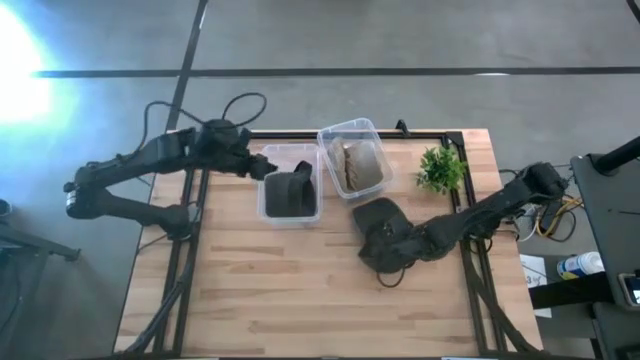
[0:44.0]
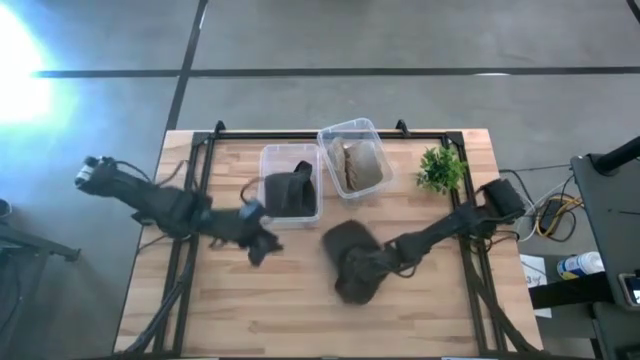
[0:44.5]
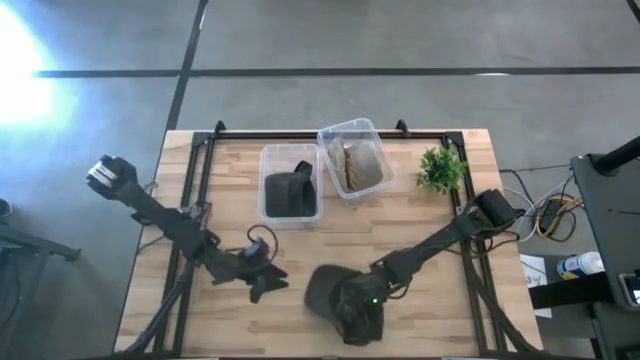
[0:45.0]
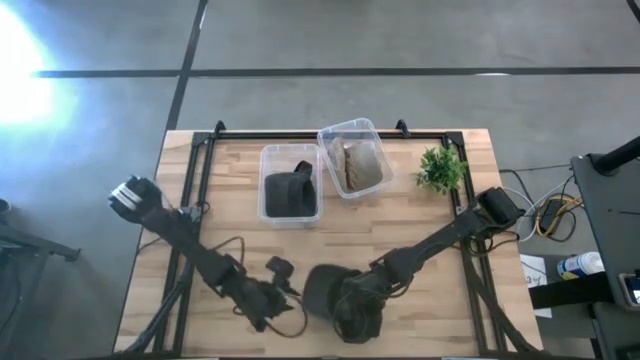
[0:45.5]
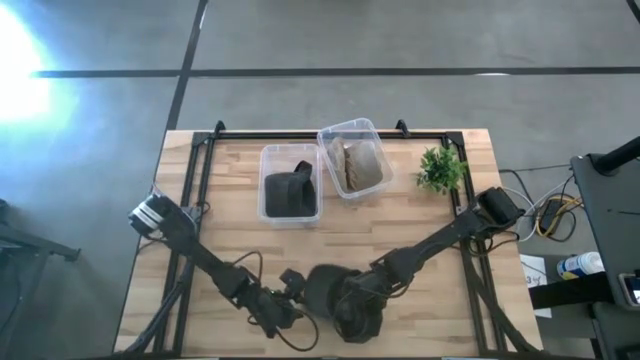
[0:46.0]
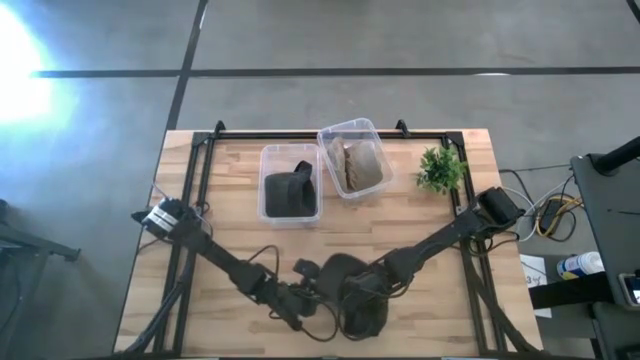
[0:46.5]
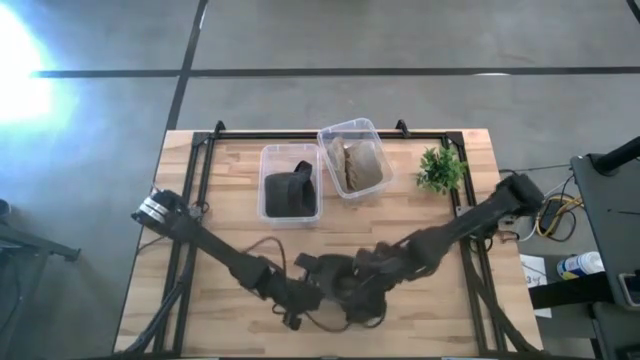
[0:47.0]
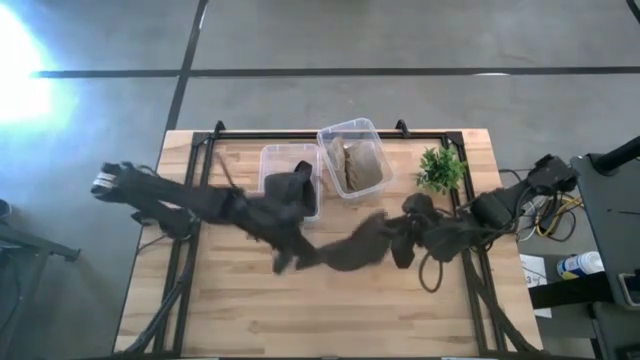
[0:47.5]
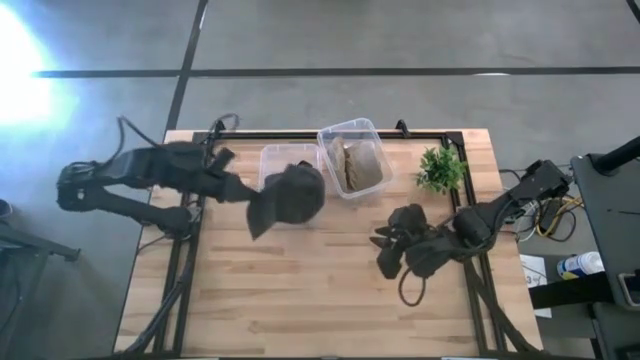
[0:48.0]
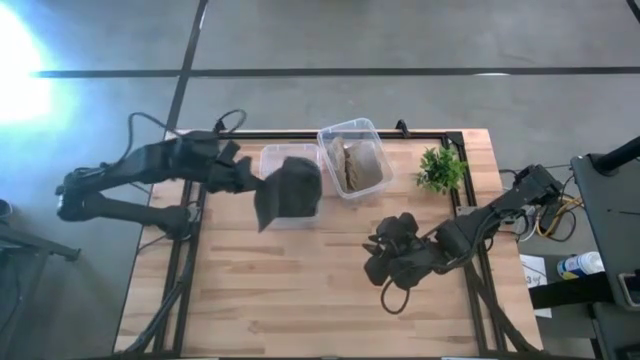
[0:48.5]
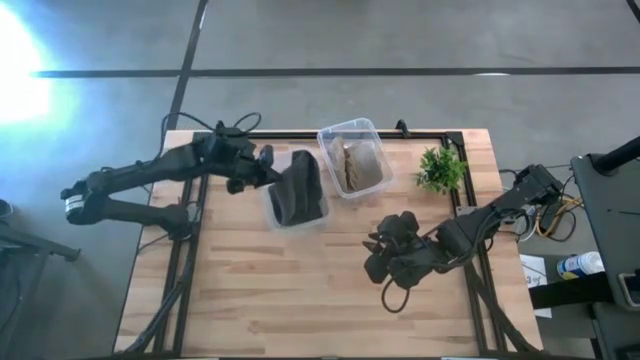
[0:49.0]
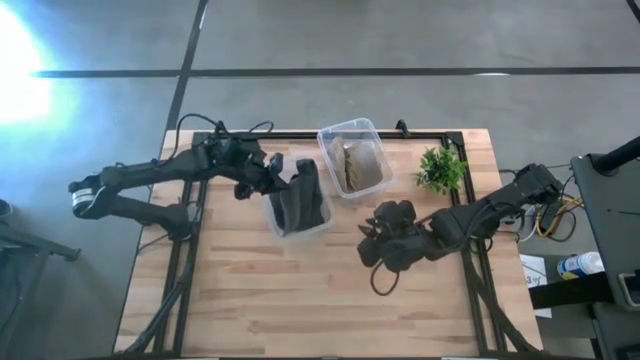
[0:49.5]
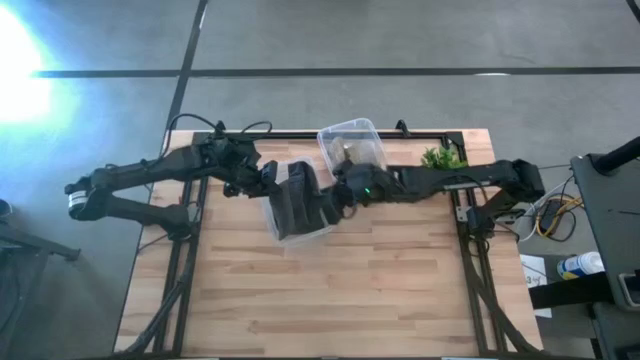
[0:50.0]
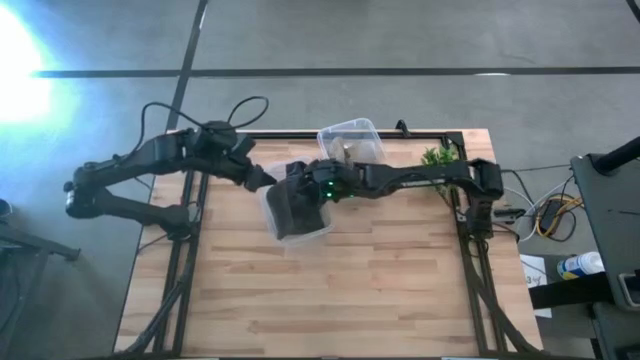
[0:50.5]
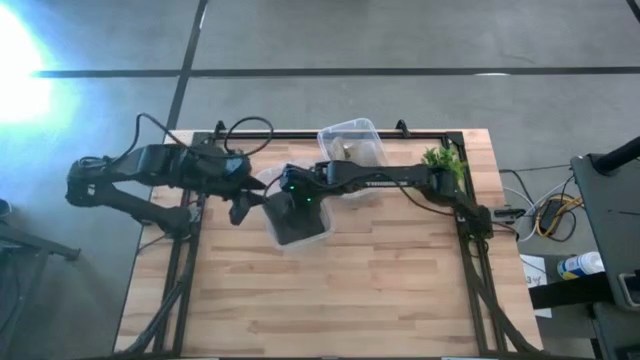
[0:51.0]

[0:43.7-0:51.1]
Task: Pick & Place hat
Put the black cap into the left transparent bin

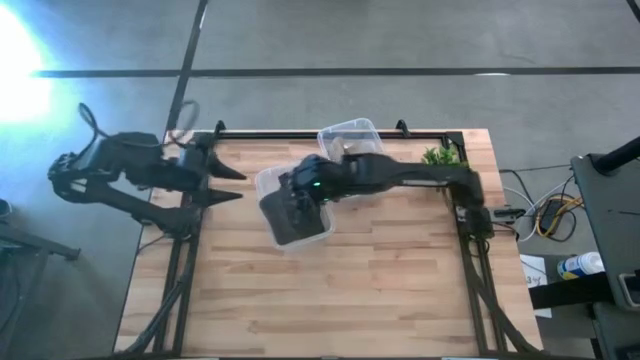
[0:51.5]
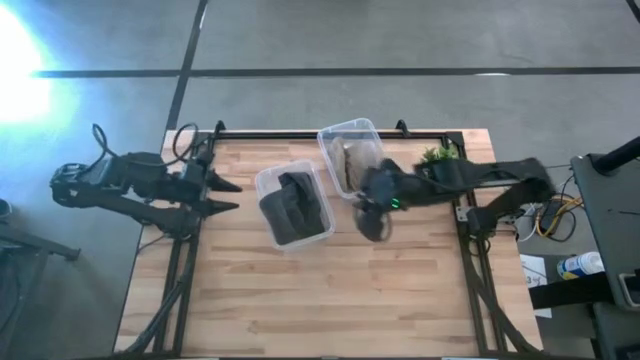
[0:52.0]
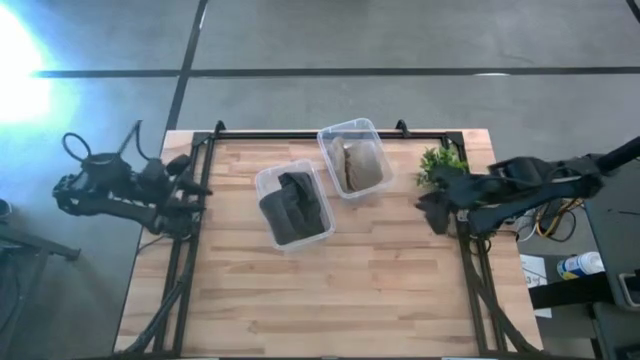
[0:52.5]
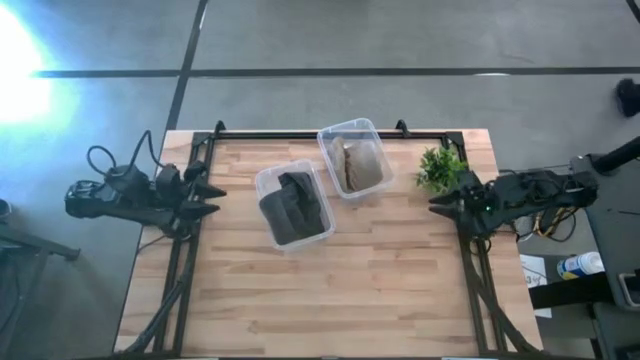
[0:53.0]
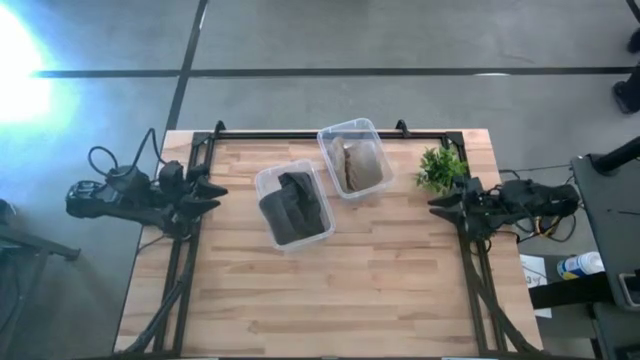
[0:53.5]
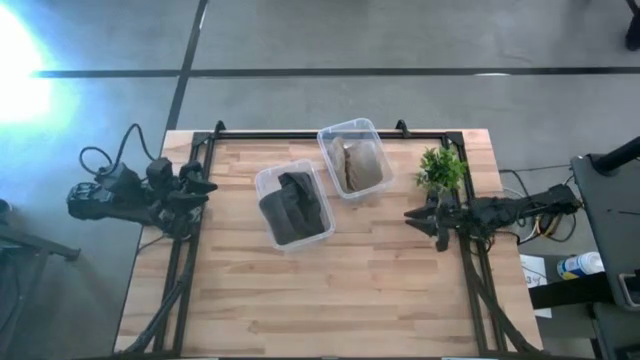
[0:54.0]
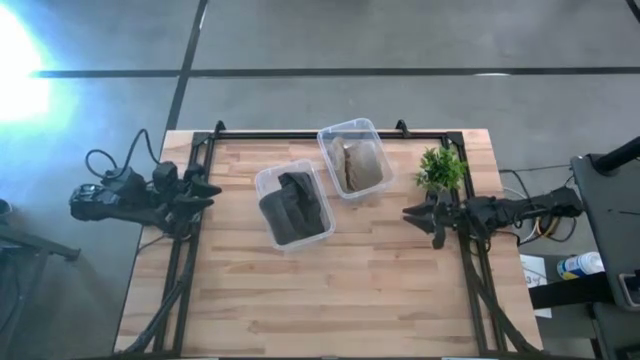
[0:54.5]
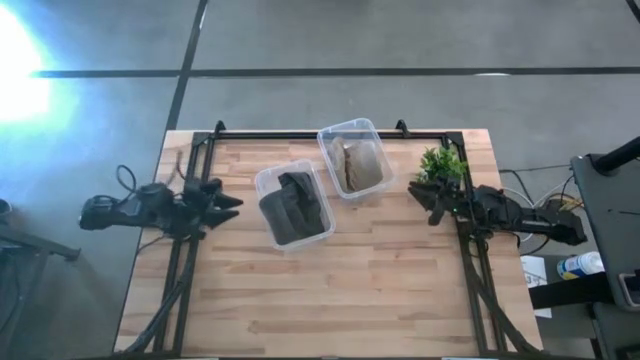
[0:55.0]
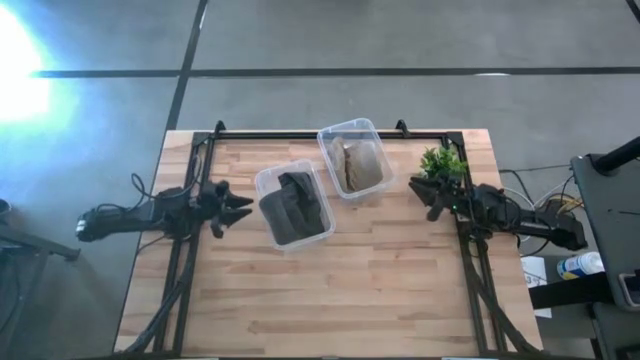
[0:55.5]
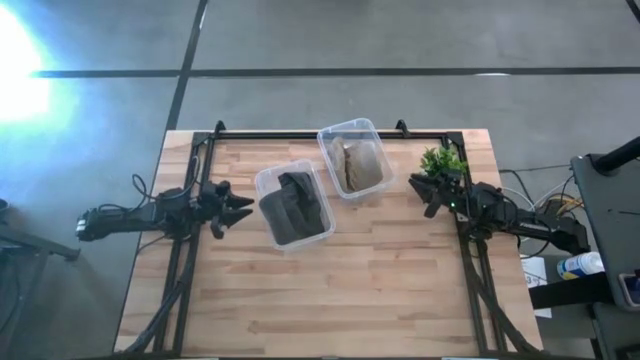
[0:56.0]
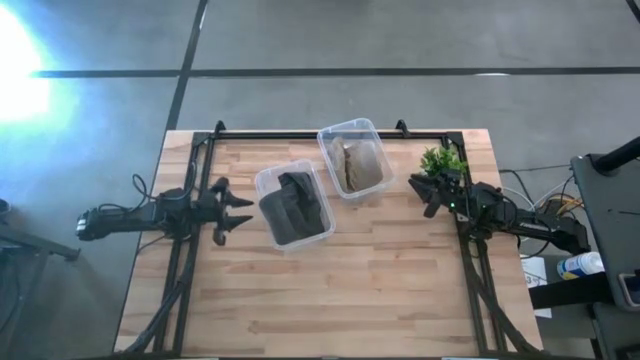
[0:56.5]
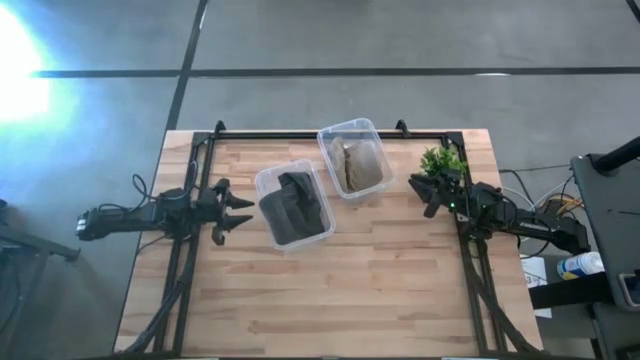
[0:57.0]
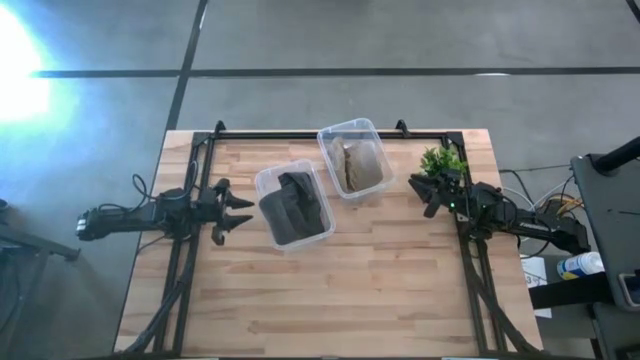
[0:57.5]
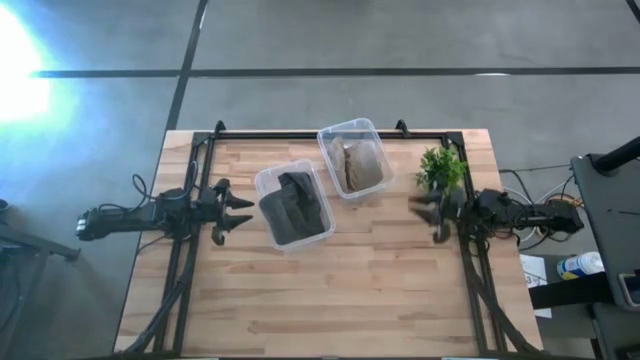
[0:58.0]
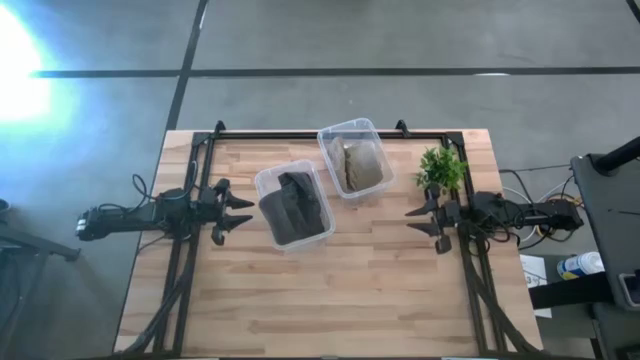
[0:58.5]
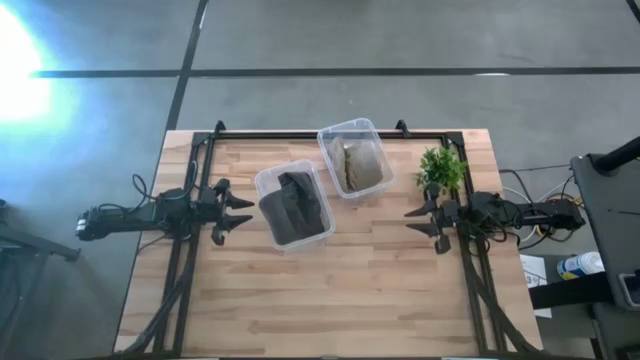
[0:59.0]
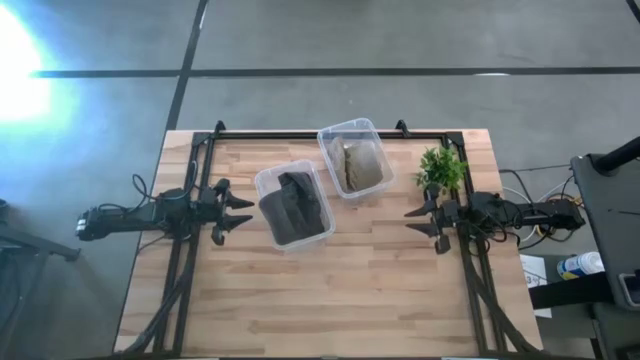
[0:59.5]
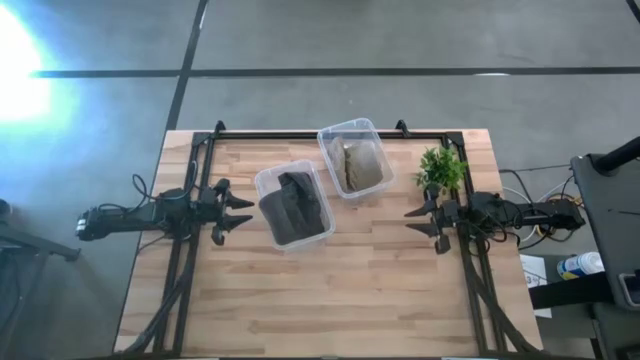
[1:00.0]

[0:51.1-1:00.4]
Return to Home Position

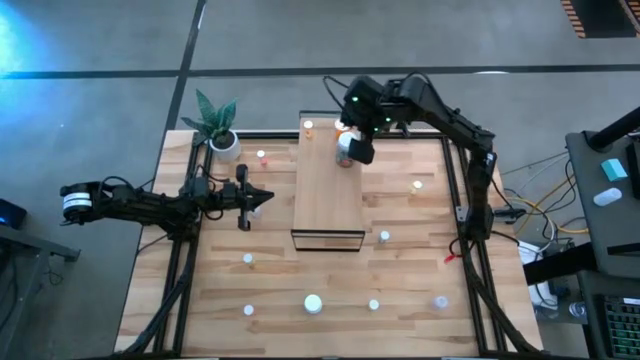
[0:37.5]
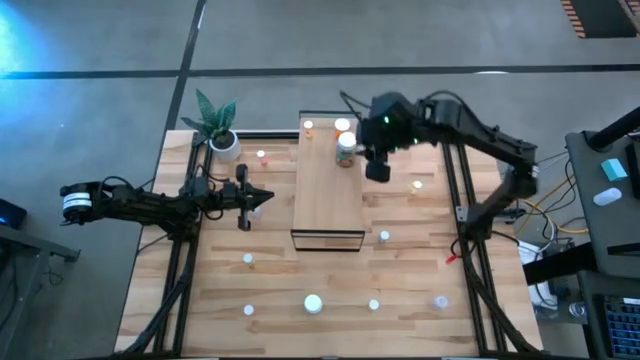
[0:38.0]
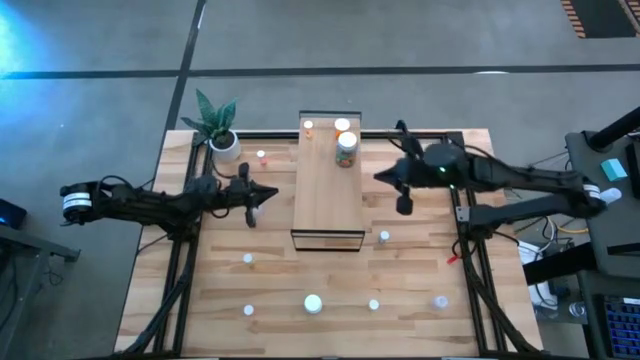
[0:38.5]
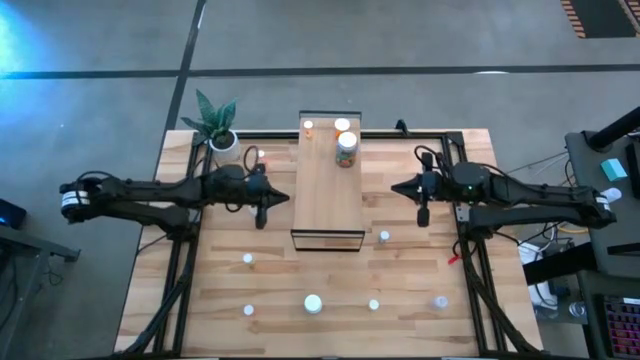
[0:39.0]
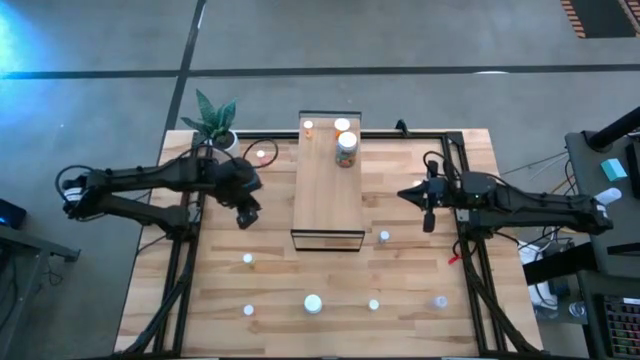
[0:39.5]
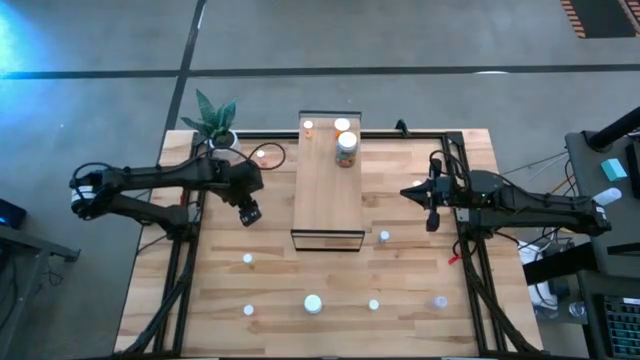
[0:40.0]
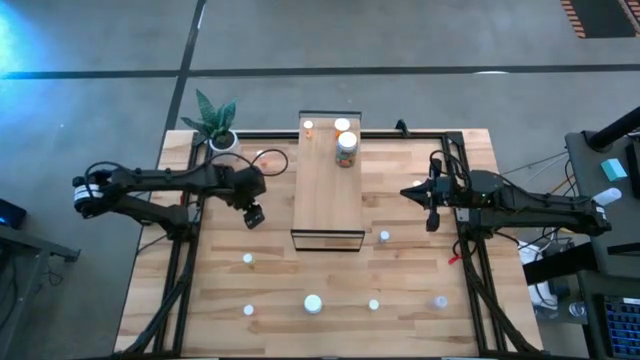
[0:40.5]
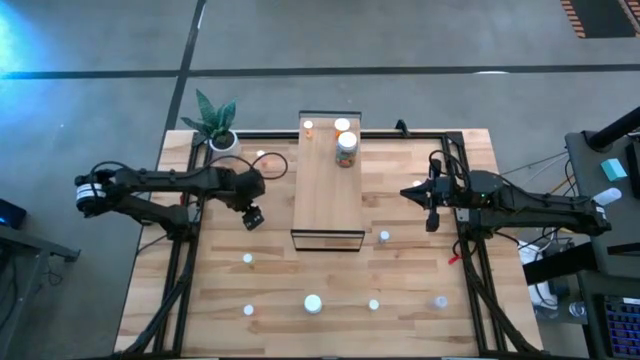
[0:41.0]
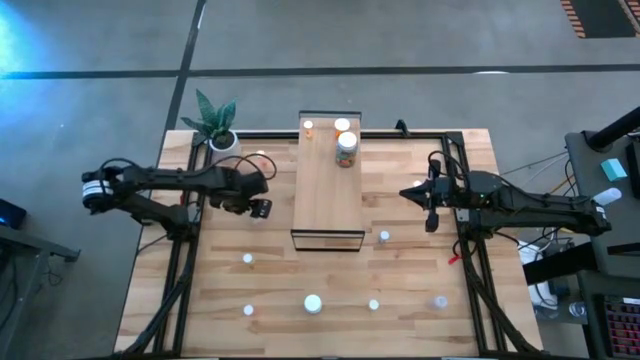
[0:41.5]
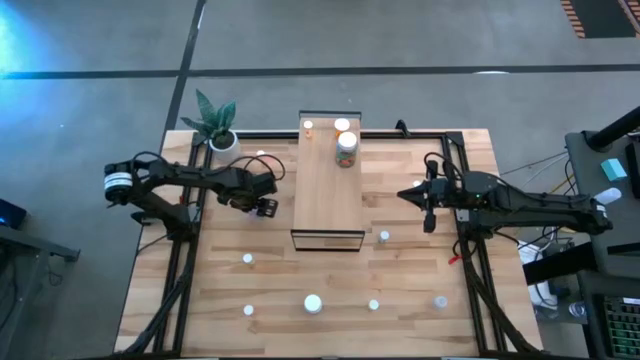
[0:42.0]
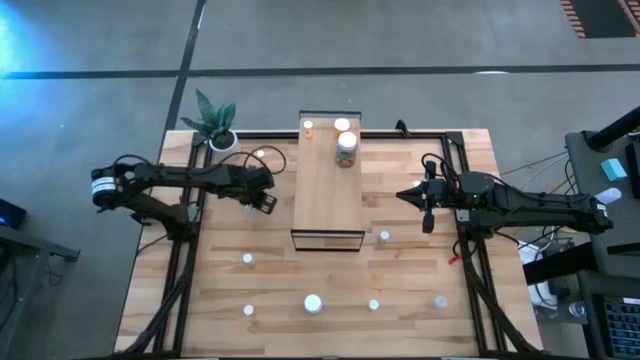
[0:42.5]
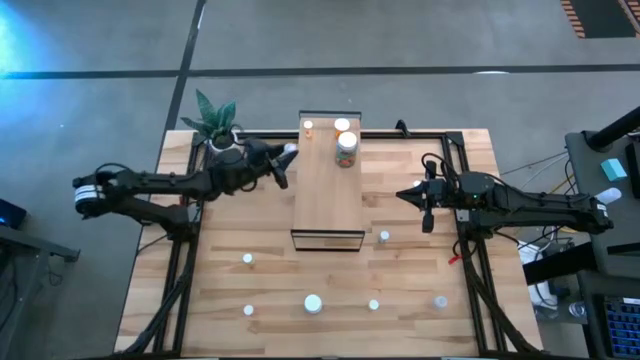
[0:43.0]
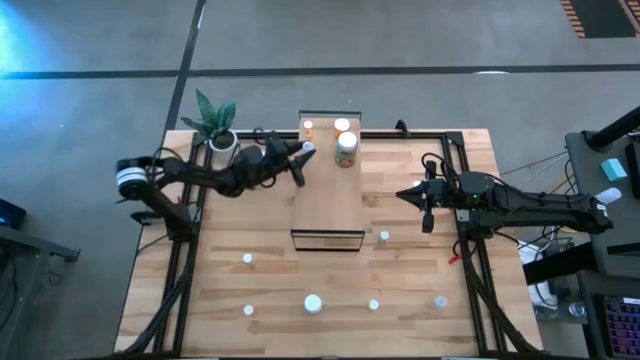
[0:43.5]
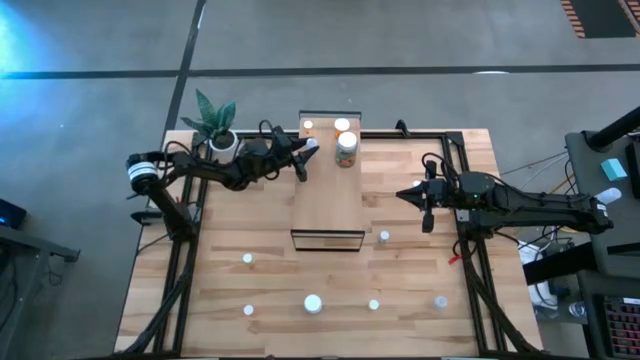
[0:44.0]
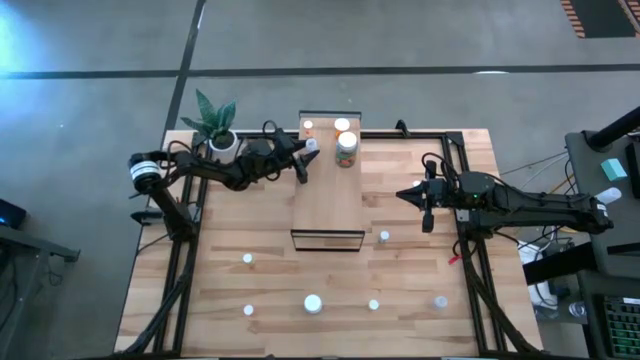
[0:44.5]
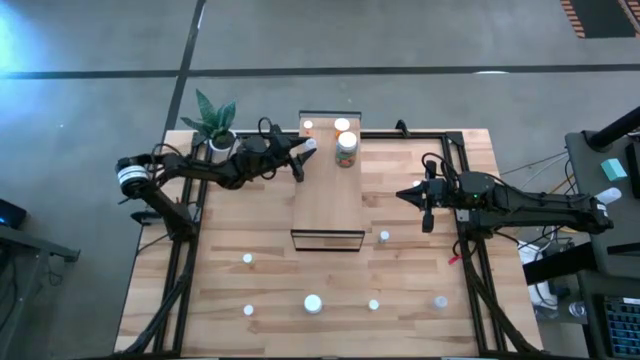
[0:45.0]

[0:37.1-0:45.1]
Task: Pick and place medicine bottles onto shelf by color
Put the top transparent pill bottle on the shelf
